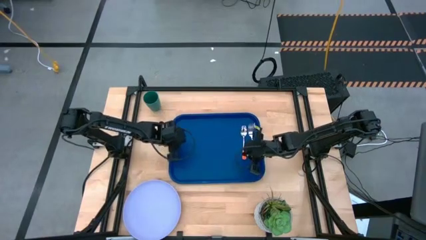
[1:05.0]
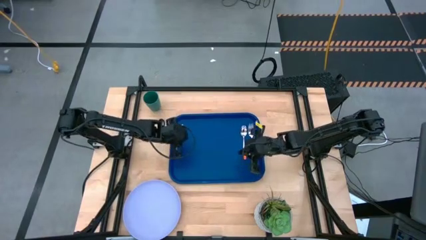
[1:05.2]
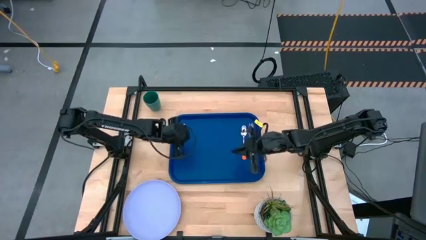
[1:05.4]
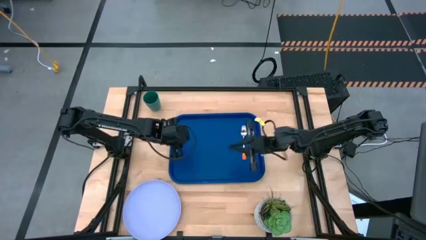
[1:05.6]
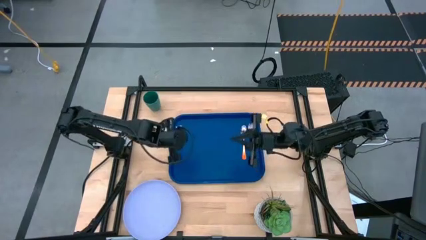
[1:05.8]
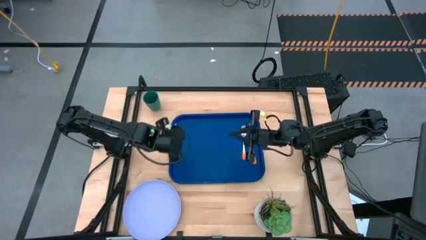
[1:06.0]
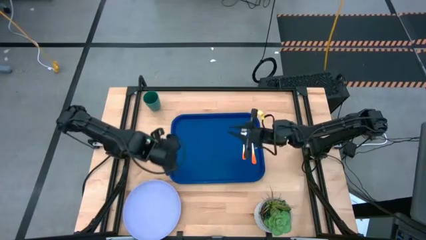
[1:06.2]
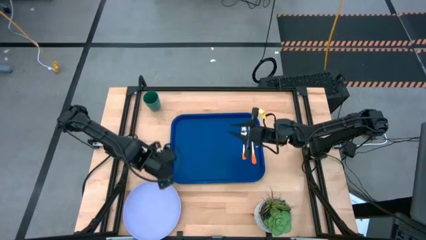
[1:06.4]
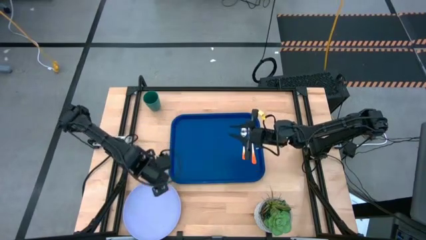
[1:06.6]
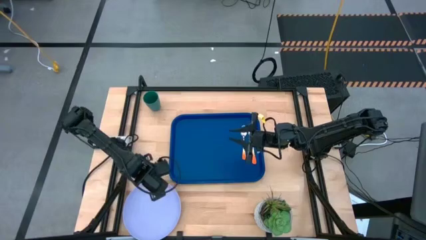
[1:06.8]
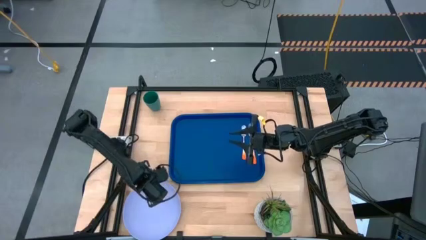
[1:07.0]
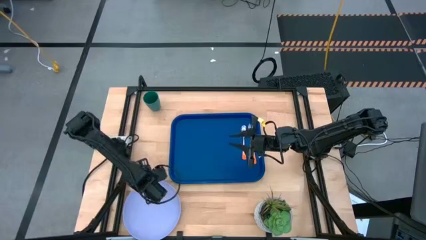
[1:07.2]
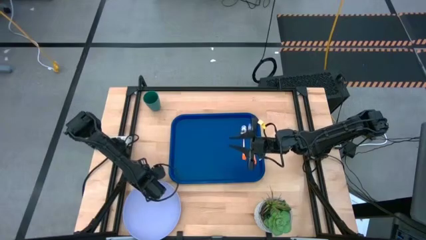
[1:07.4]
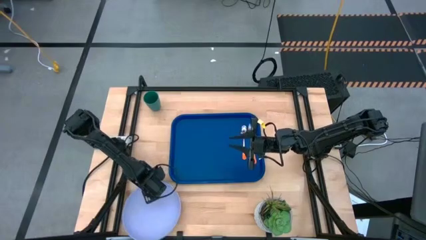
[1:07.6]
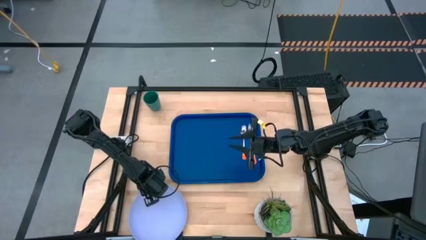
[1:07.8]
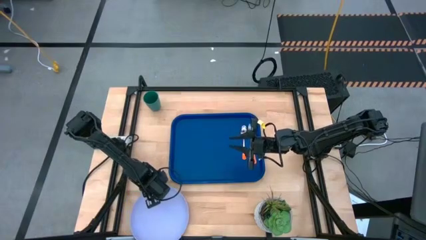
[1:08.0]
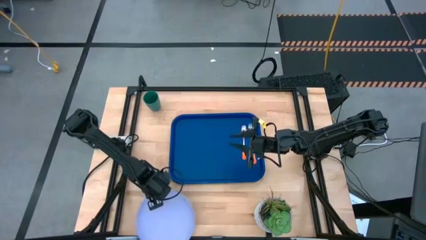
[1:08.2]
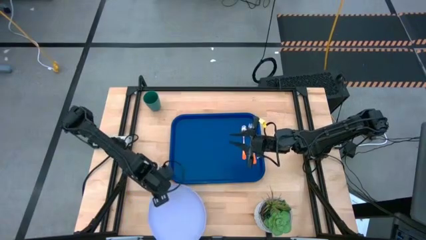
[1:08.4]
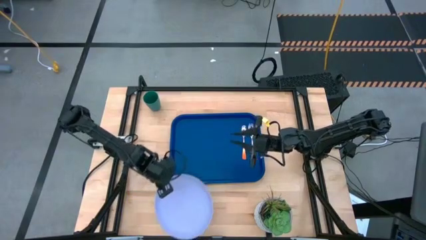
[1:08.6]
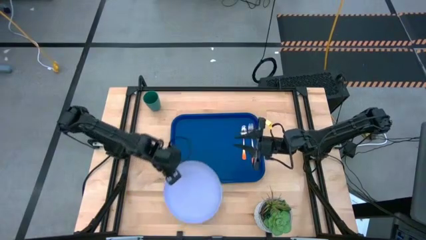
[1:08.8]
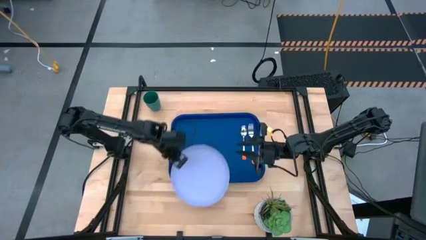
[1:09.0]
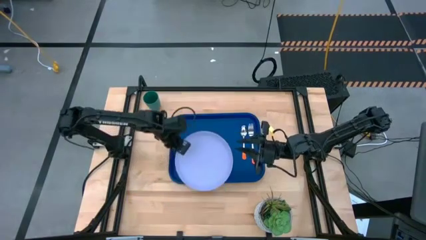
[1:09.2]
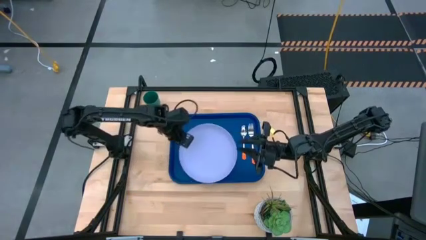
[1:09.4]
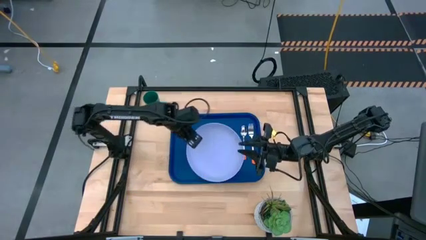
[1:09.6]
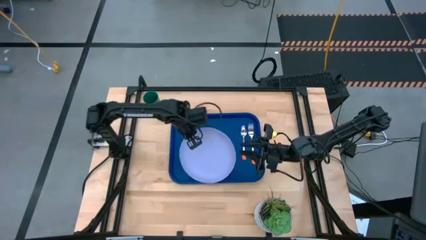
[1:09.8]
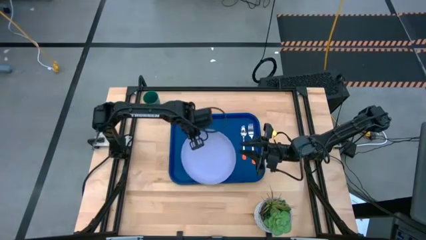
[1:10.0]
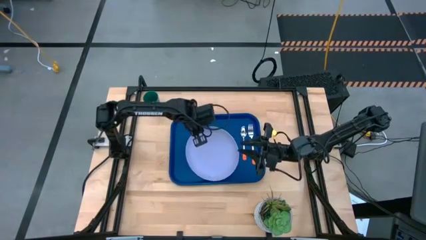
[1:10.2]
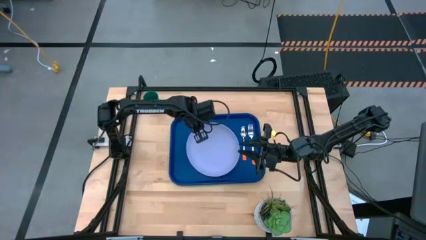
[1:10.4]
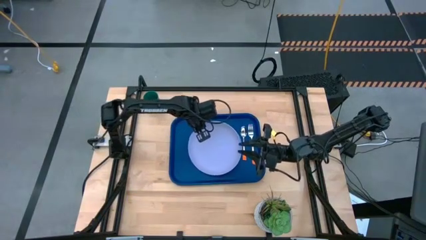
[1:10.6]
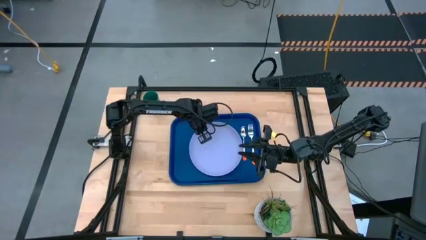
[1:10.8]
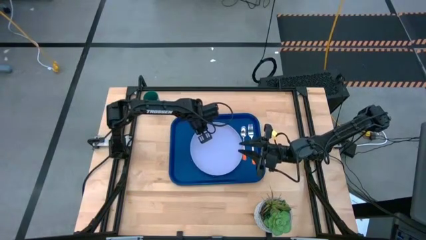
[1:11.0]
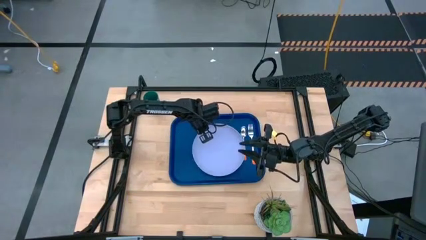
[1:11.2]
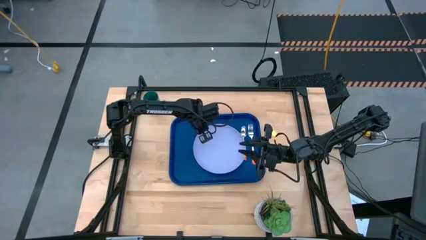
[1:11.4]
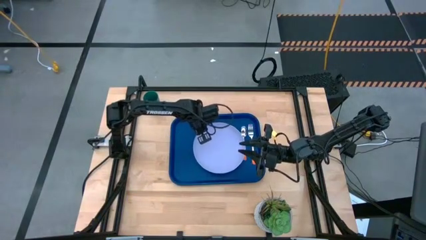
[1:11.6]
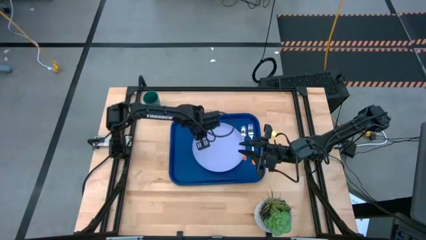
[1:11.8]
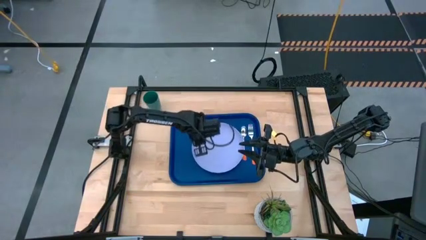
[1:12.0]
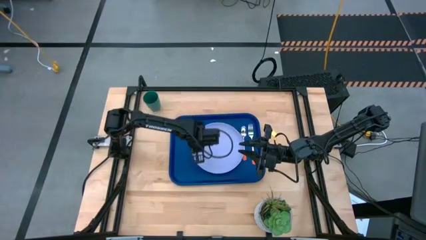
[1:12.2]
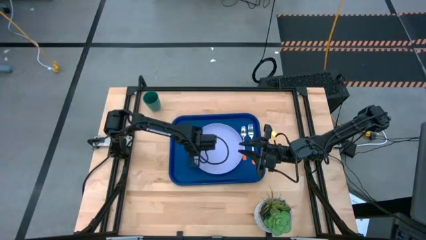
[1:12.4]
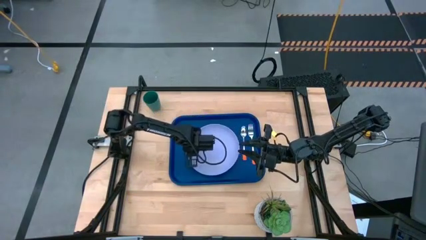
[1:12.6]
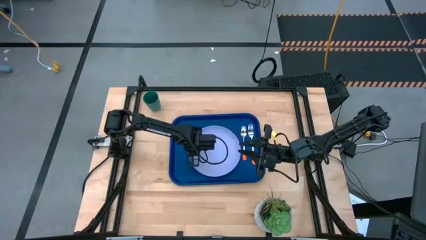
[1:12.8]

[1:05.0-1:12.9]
Task: Pick and place plate/cup/fork/spoon on tray
Put the purple plate on the blue serving tray to the left of the orange spoon

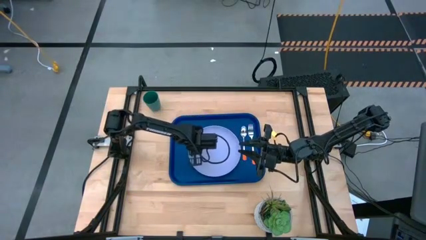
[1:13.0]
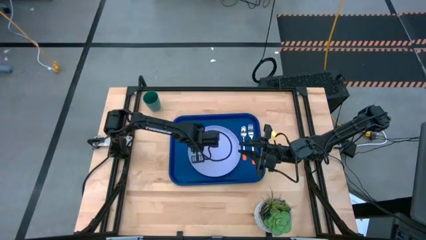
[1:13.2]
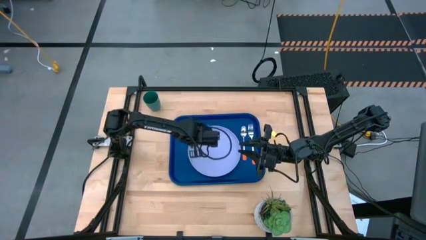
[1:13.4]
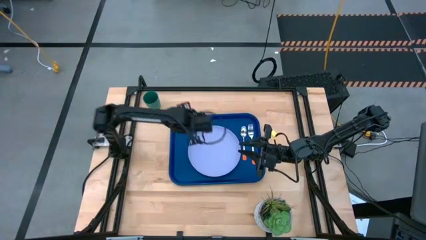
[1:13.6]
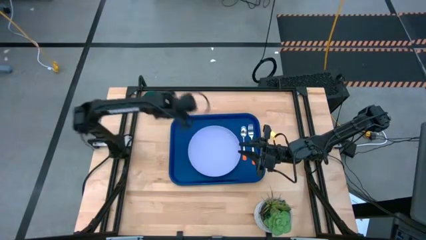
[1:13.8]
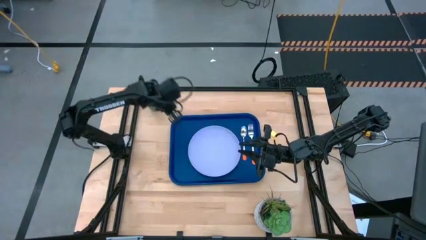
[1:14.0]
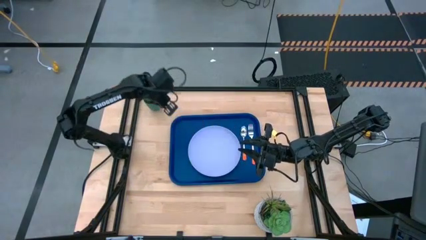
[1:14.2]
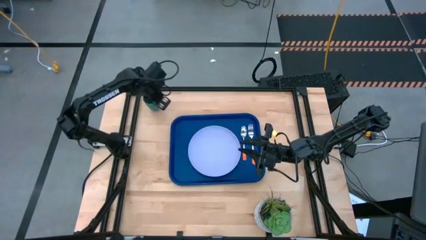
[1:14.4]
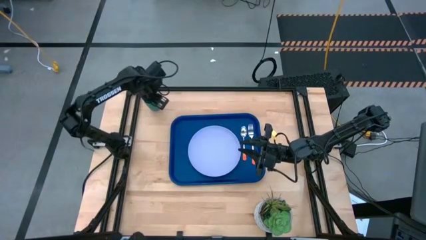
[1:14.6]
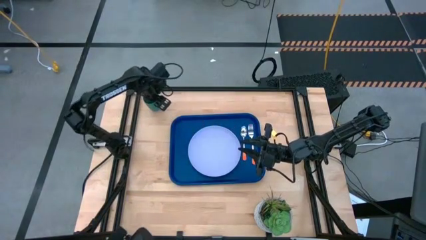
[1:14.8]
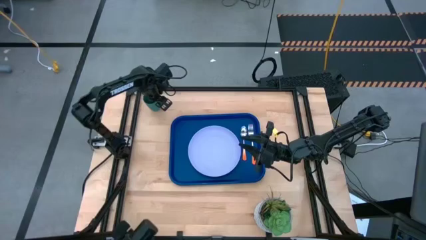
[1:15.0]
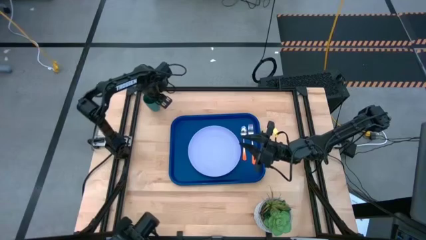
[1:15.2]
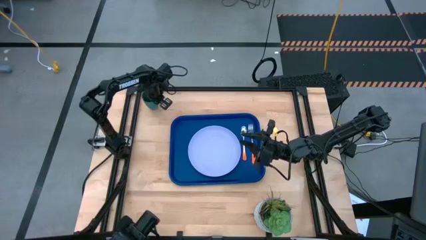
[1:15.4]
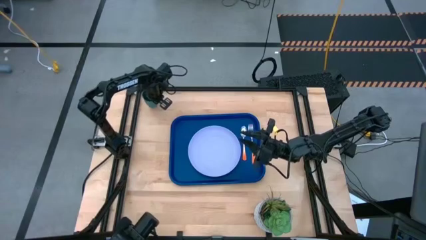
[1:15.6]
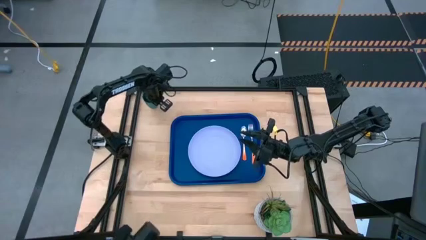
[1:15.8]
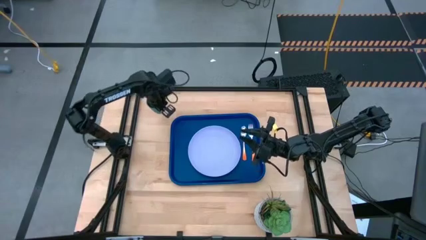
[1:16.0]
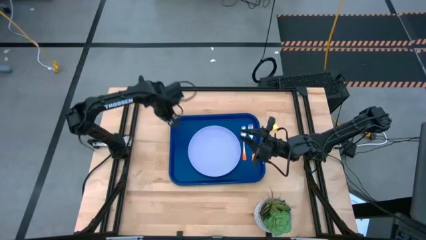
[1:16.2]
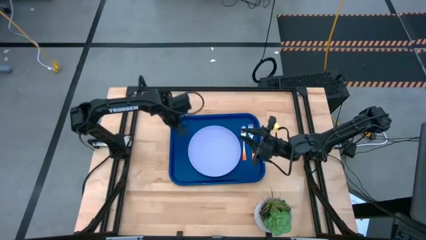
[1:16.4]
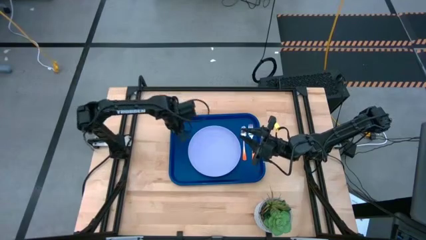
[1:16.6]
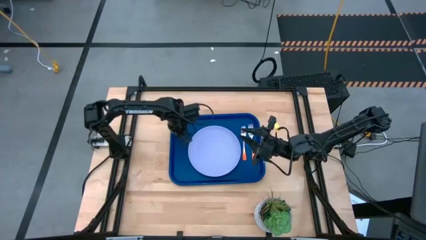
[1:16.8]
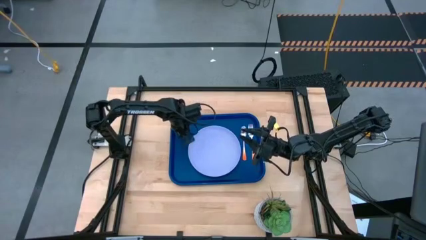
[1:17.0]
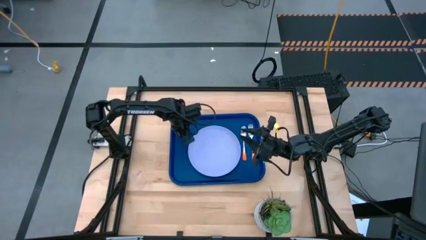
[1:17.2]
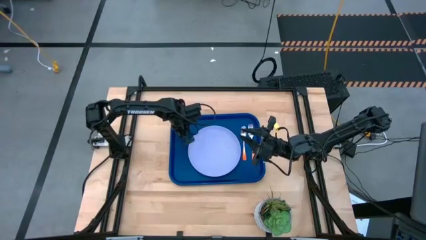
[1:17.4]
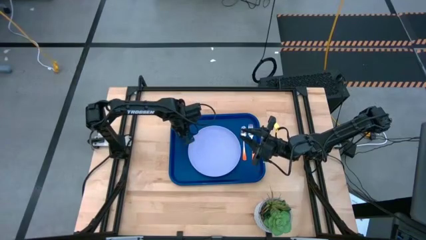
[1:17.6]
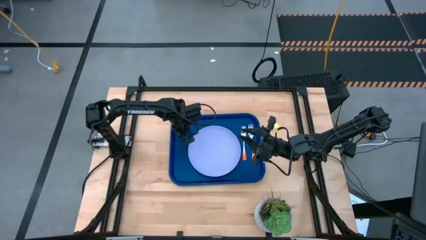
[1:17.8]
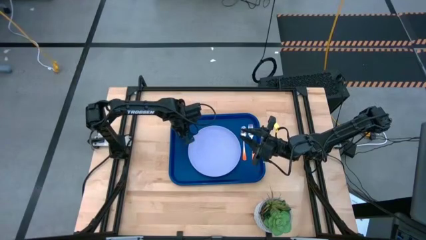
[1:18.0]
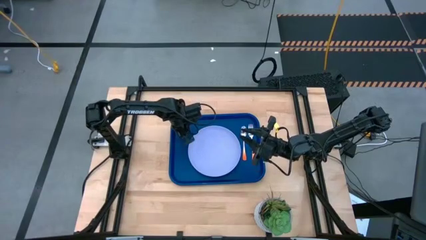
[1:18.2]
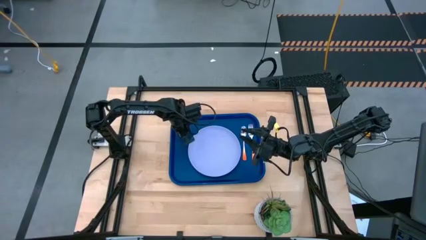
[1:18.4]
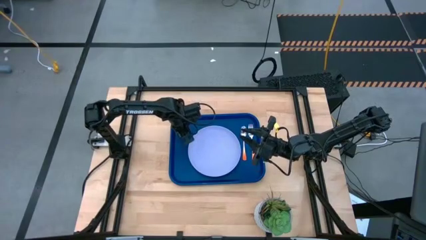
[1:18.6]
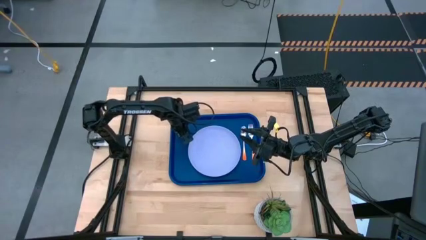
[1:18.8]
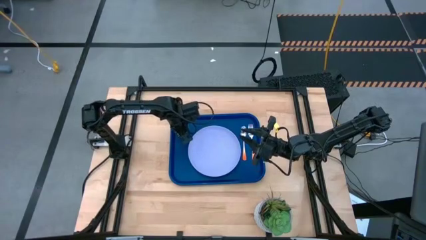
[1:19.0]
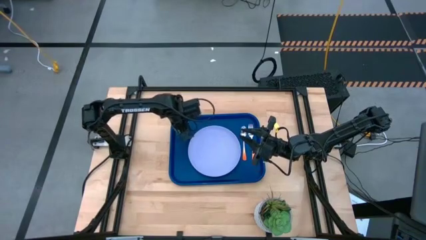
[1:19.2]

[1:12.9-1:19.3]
Put the green cup on the blue serving tray to the top left of the purple plate

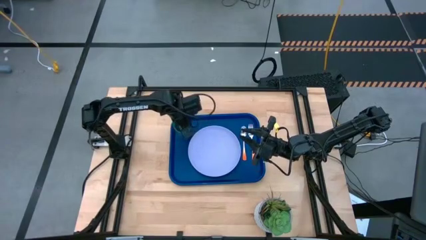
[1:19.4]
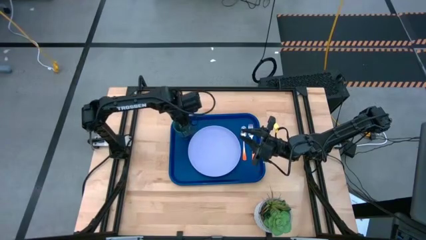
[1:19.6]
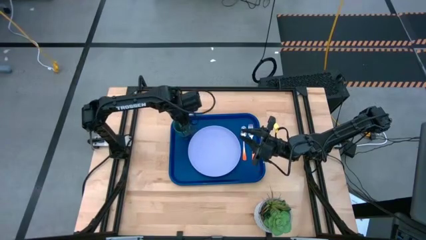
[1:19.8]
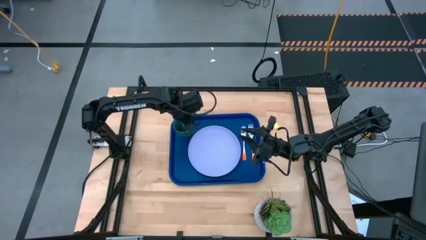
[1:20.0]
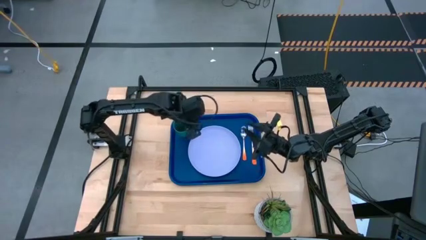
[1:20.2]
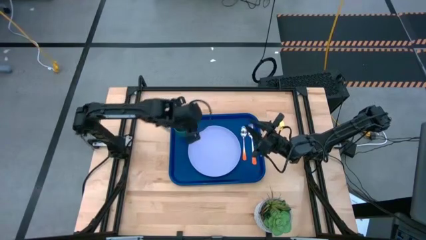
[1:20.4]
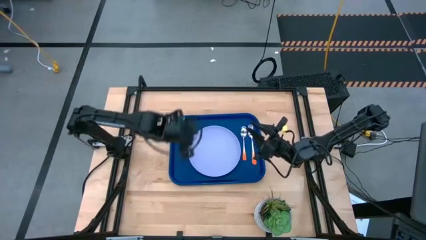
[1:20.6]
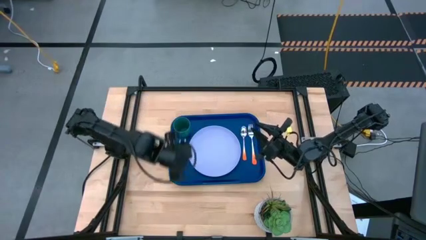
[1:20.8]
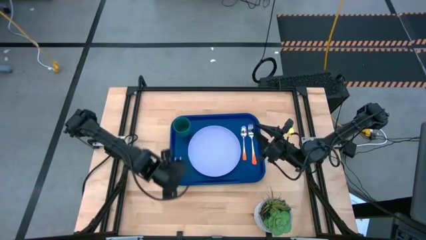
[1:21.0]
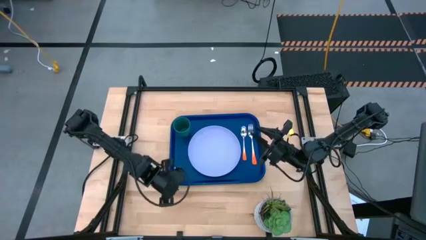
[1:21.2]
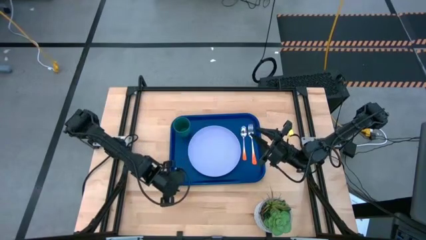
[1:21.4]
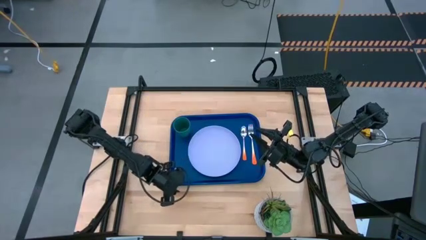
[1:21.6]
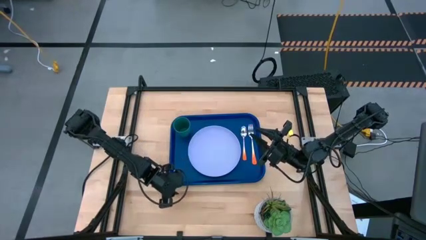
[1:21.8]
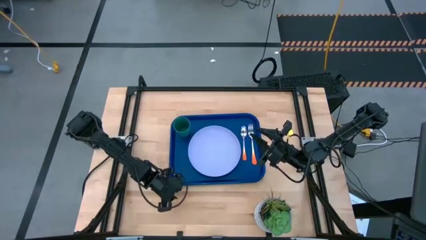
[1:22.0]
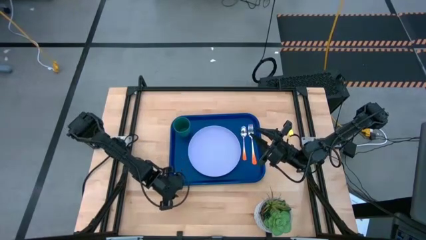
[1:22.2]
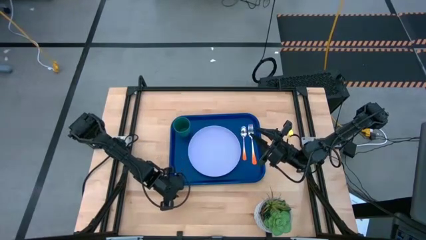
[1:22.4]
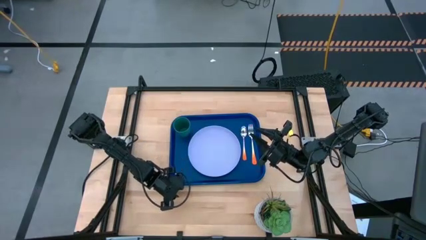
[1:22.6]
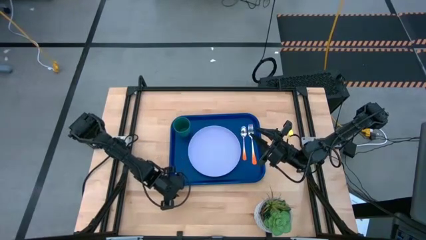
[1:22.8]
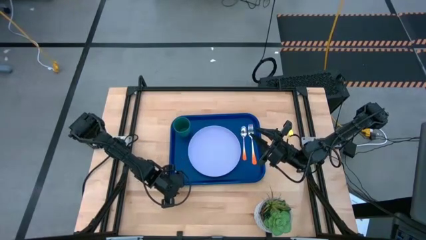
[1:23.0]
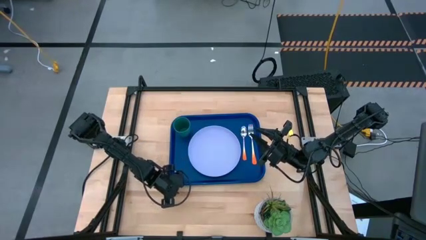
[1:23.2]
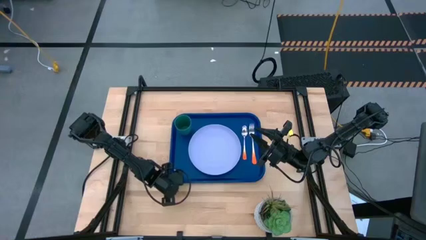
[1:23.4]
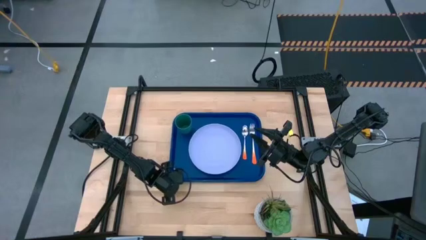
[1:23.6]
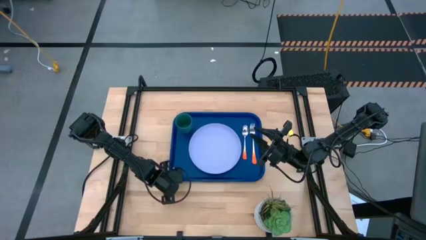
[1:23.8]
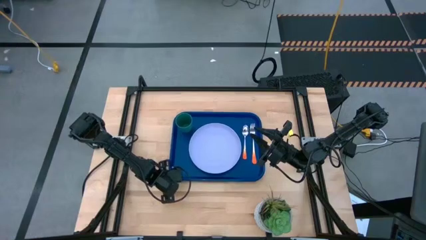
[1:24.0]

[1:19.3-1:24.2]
Adjust the blue serving tray
